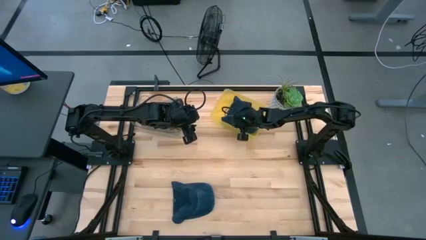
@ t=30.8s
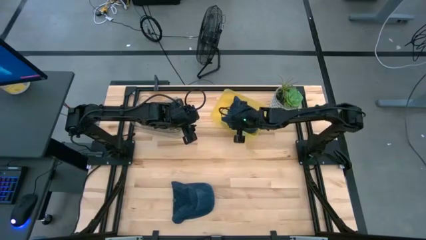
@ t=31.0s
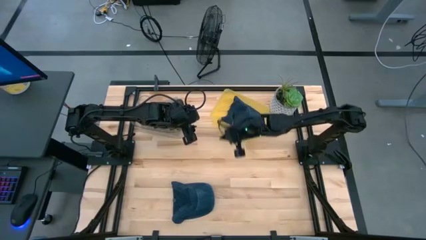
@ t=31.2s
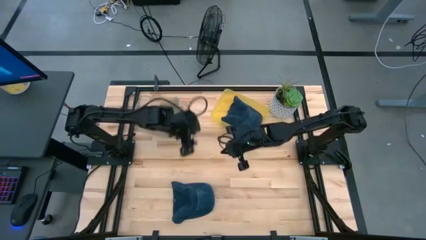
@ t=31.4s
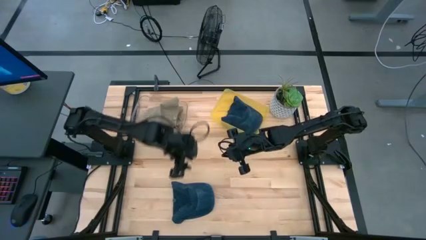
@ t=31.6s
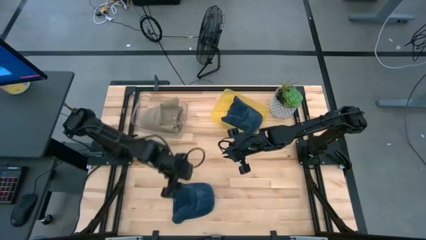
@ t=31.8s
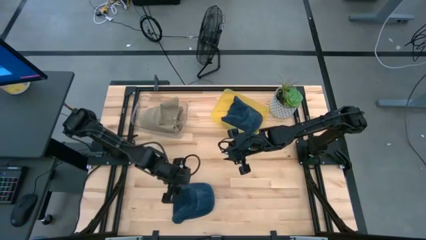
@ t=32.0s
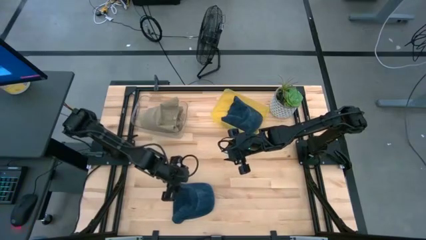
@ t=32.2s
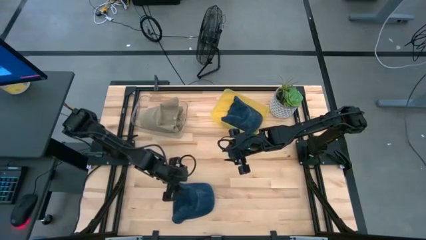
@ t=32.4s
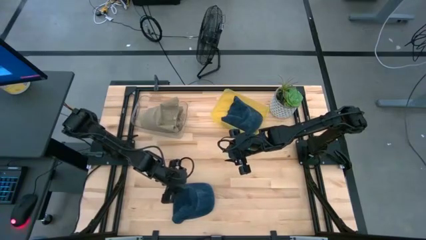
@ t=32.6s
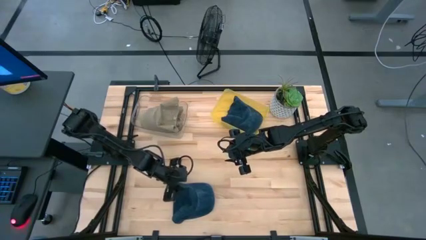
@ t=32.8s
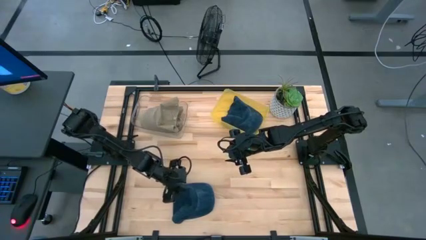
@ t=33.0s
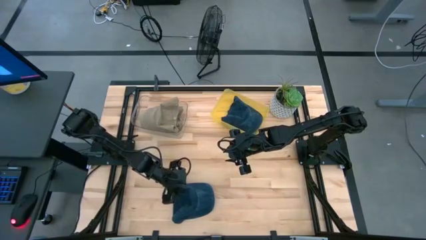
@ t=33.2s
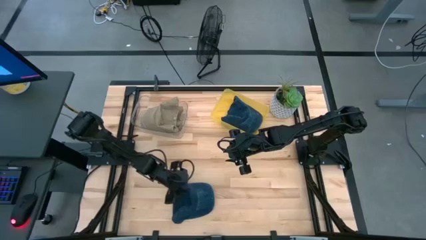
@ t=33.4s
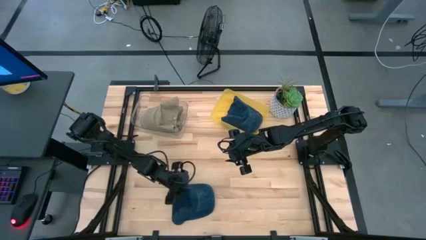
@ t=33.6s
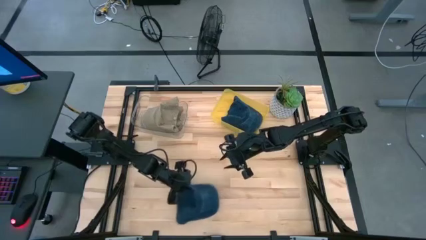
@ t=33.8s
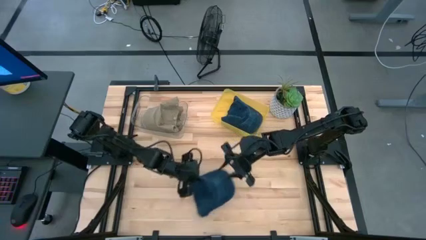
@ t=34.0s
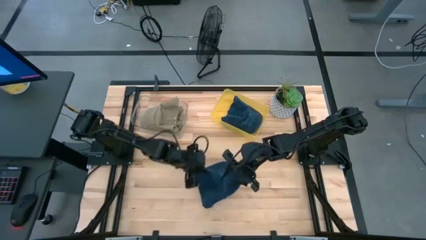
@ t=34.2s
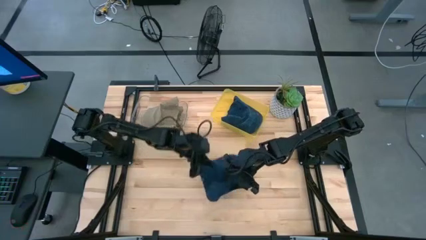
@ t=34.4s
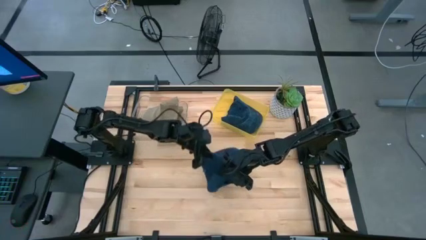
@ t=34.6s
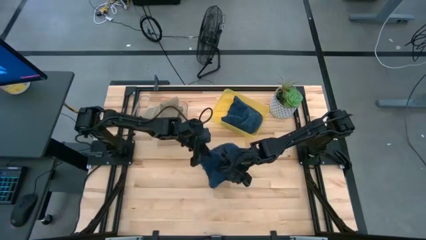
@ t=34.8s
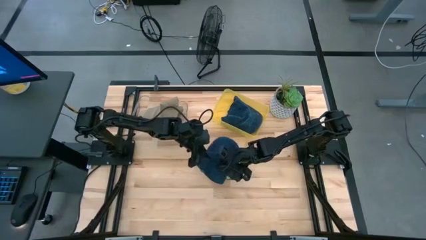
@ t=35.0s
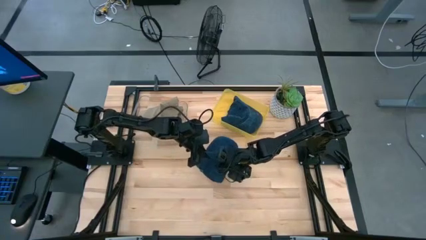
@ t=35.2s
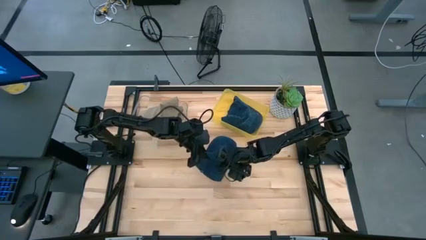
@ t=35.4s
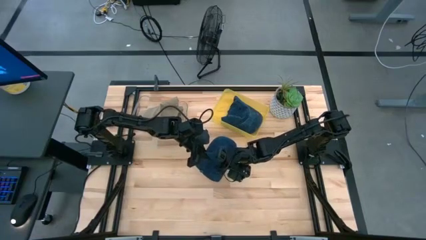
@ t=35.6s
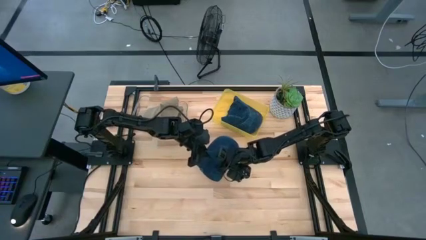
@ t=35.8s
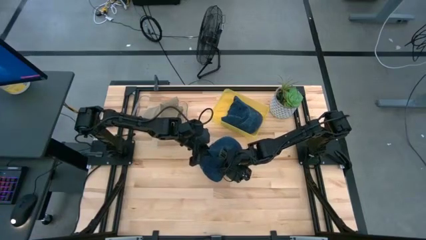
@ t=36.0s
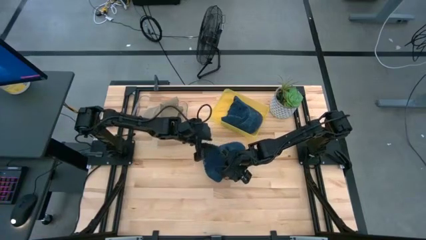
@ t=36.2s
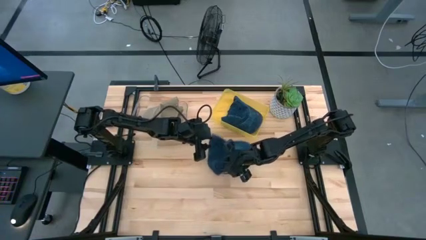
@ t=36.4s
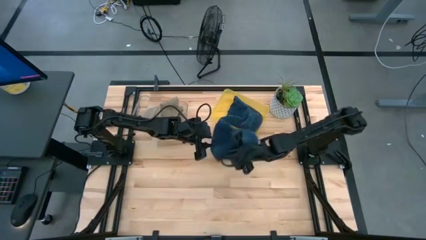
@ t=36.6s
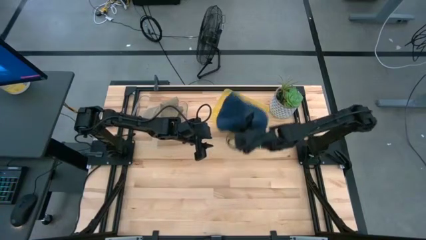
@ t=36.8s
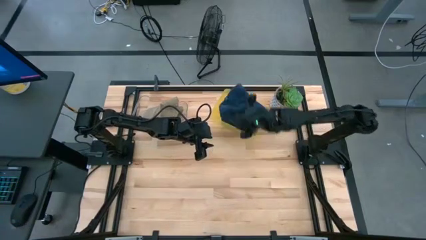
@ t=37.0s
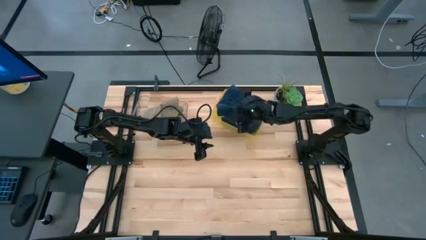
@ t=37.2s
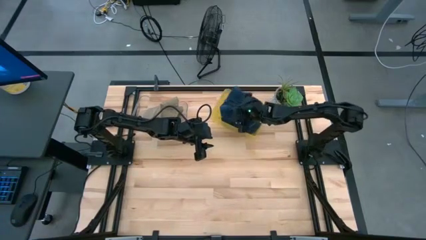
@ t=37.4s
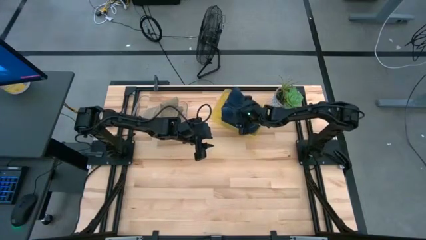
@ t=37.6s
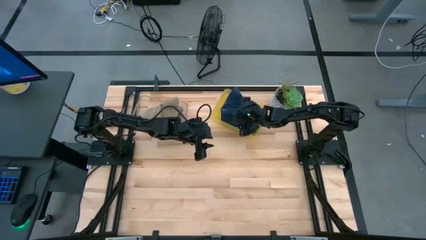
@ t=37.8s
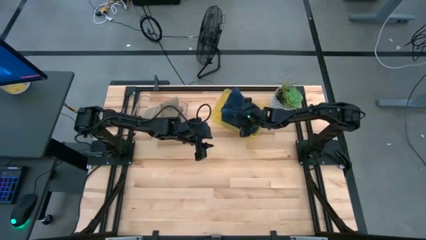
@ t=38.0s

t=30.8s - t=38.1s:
Task: Pick & Place hat
Put the blue cap into the yellow bin

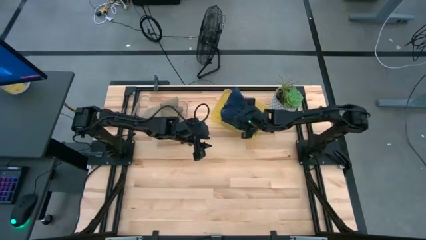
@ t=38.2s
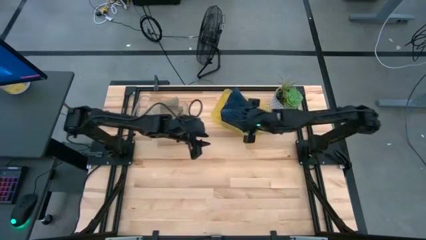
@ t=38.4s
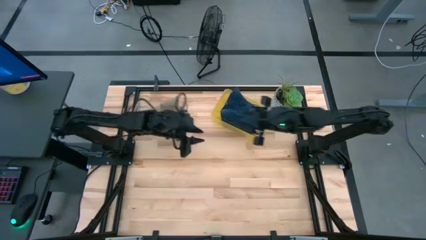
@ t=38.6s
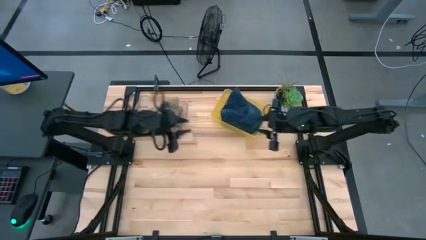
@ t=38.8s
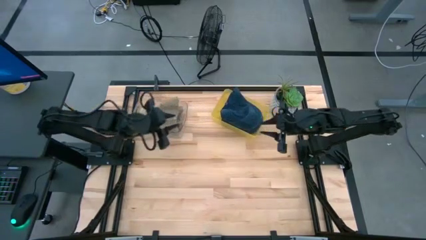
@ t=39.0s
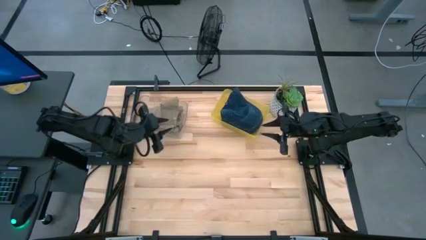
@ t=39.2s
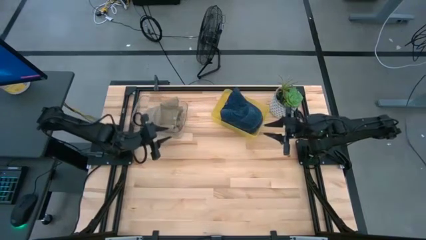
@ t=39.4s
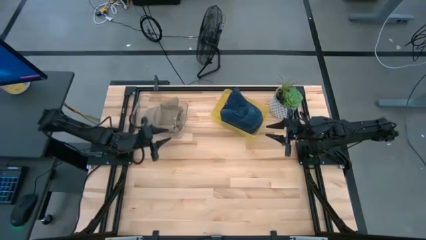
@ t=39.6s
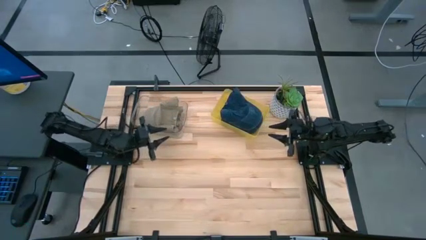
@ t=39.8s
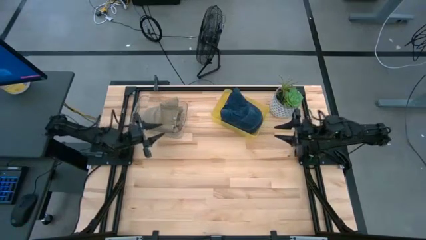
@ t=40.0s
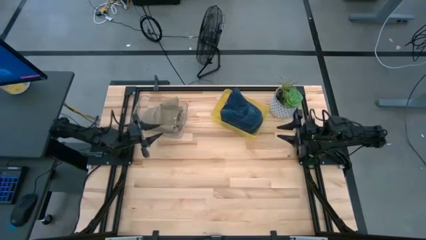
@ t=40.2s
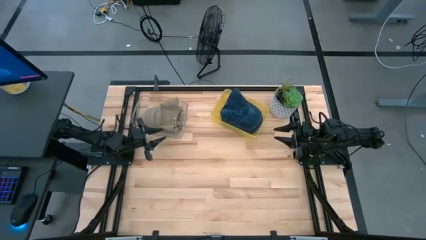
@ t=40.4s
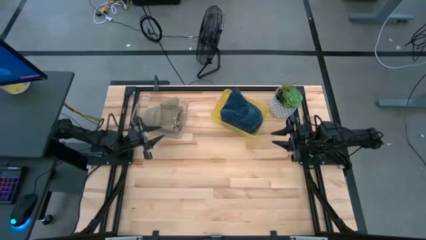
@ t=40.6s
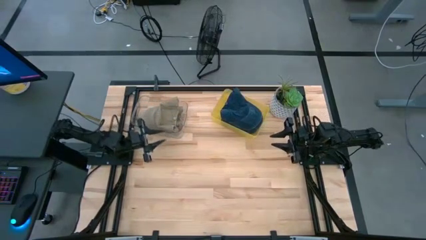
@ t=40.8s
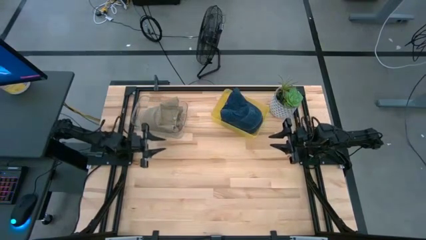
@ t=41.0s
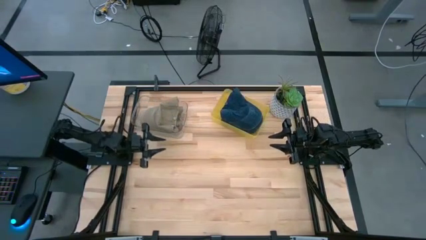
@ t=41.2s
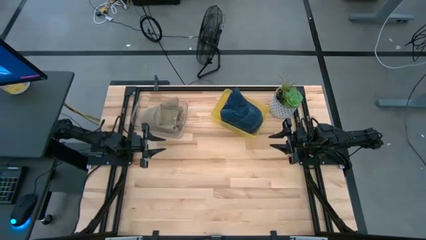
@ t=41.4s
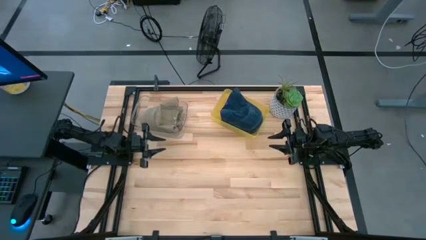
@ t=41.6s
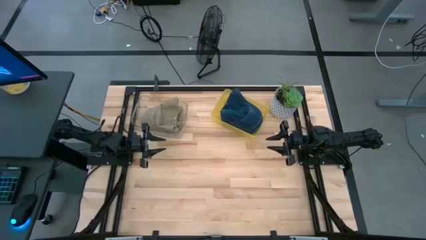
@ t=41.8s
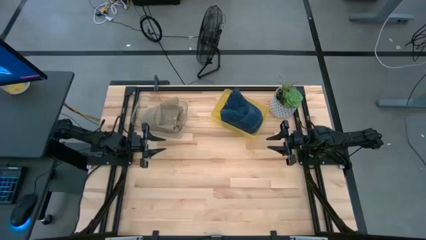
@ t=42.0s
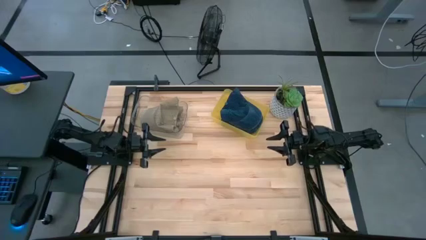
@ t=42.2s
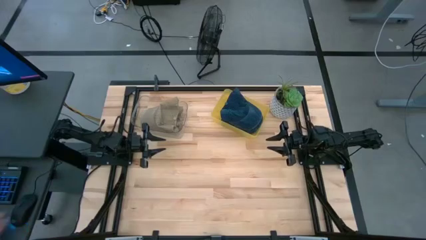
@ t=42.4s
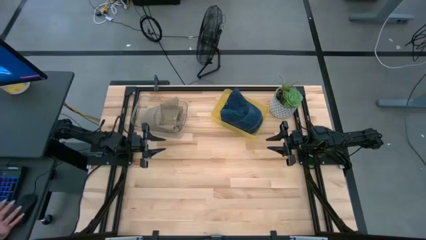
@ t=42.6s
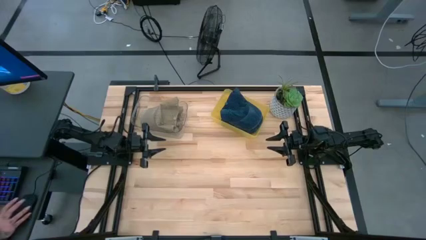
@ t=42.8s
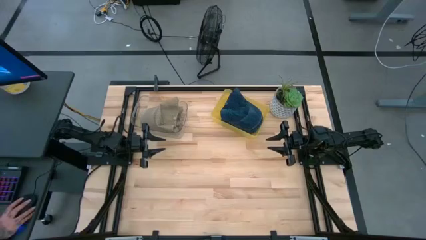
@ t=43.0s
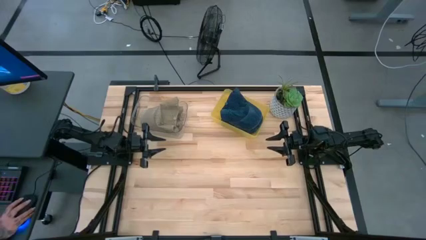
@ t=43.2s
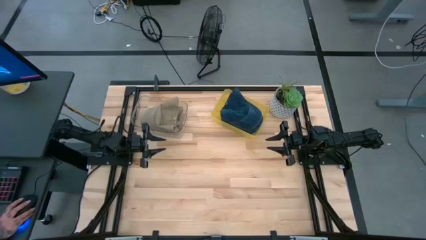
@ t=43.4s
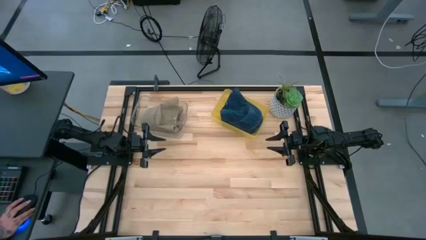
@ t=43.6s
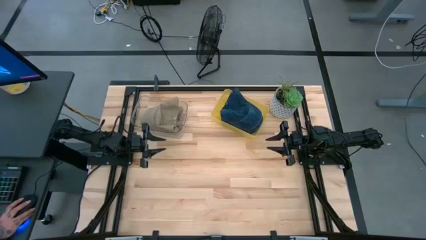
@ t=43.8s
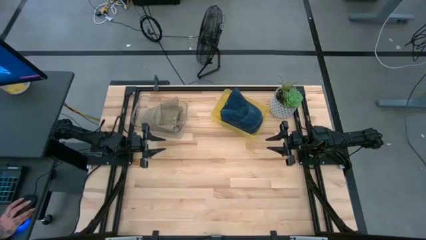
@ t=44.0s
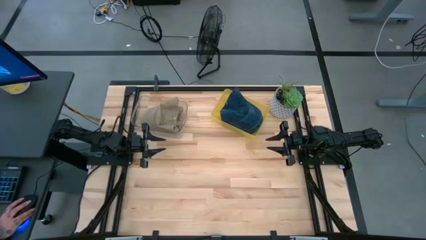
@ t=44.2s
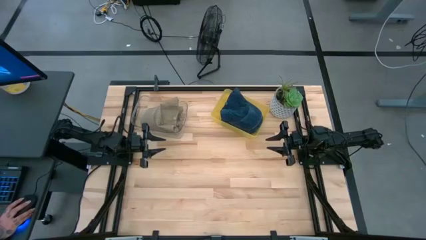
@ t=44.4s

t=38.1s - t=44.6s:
Return to Home Position
